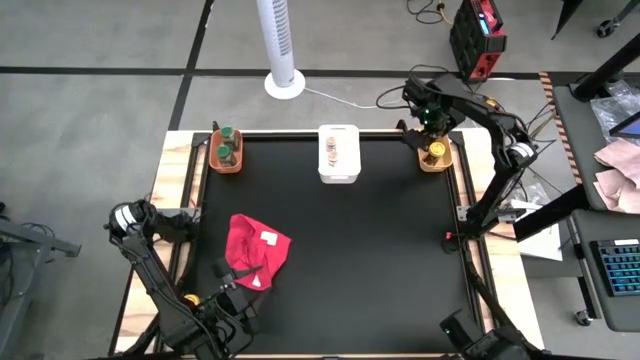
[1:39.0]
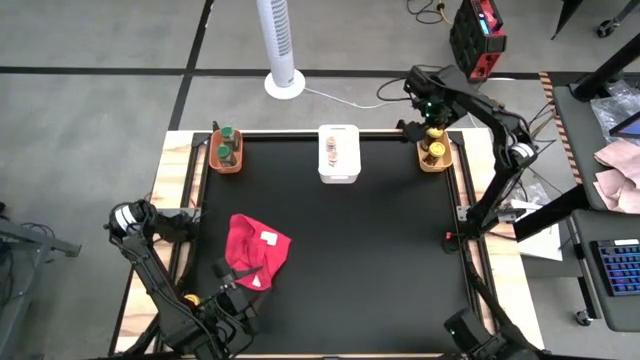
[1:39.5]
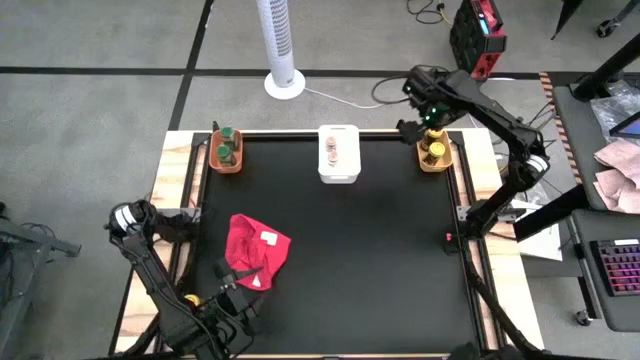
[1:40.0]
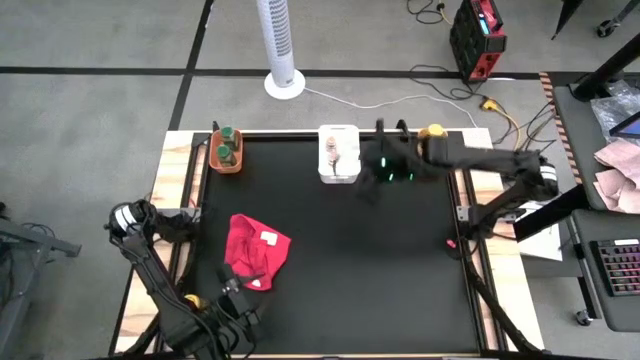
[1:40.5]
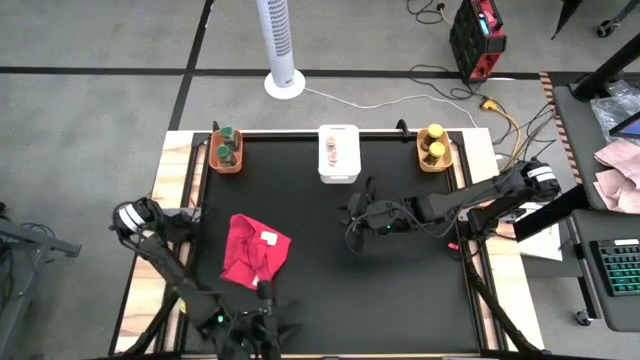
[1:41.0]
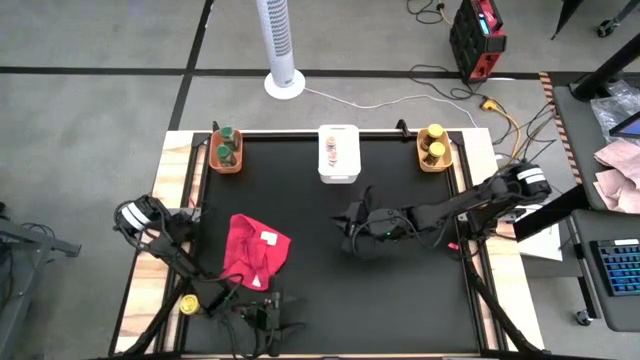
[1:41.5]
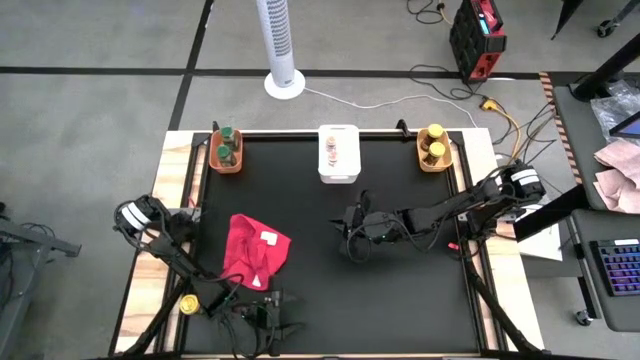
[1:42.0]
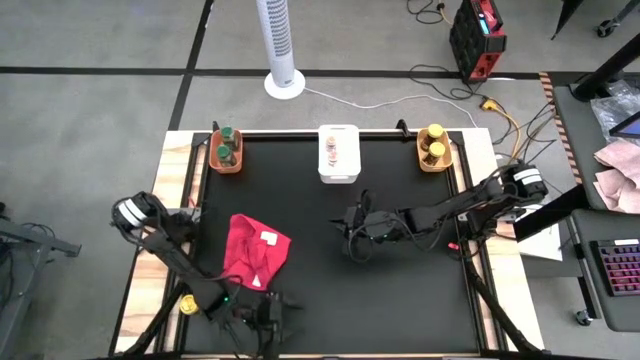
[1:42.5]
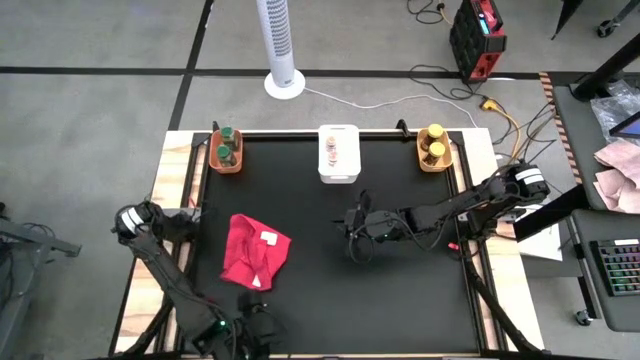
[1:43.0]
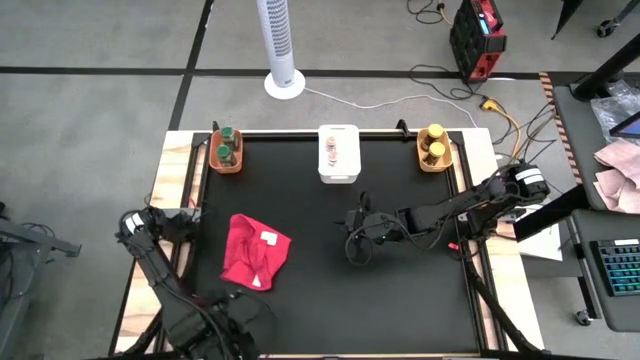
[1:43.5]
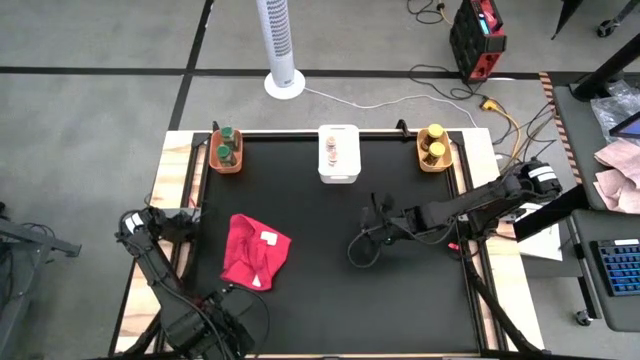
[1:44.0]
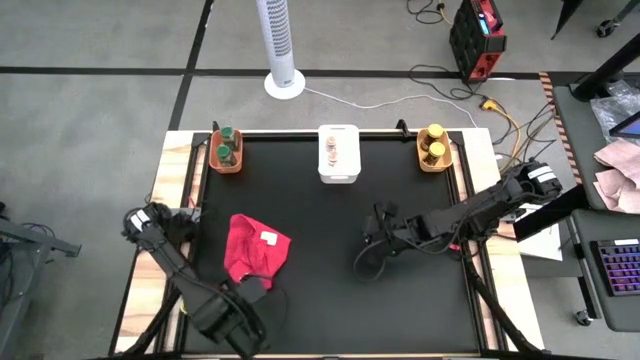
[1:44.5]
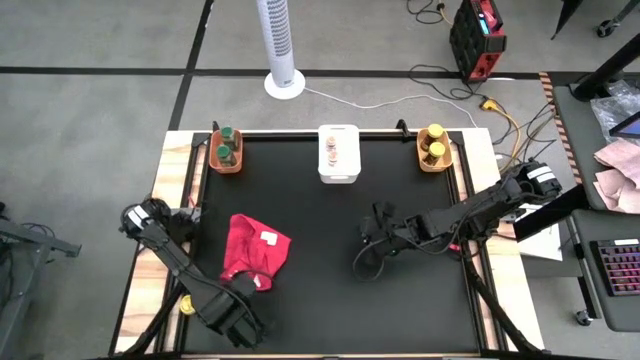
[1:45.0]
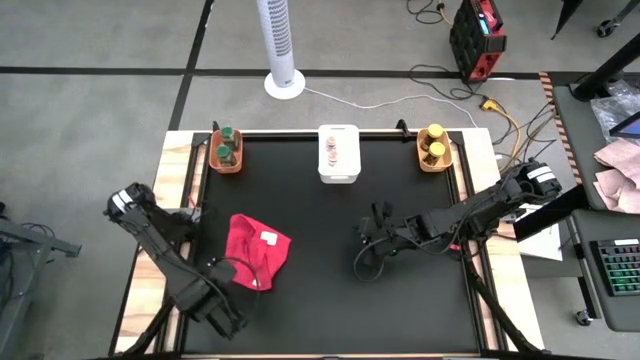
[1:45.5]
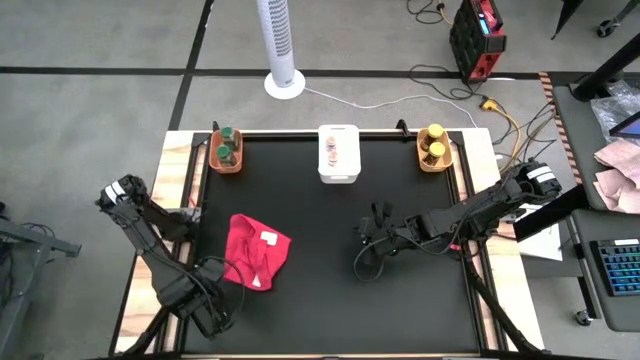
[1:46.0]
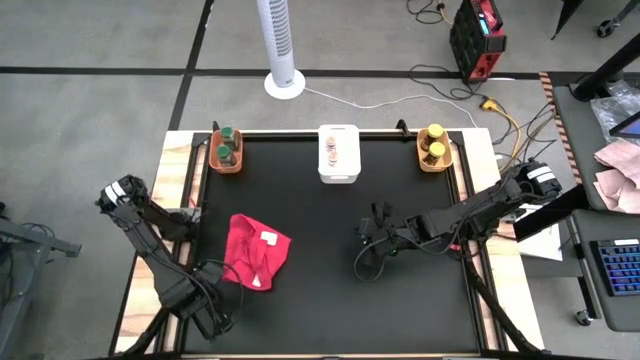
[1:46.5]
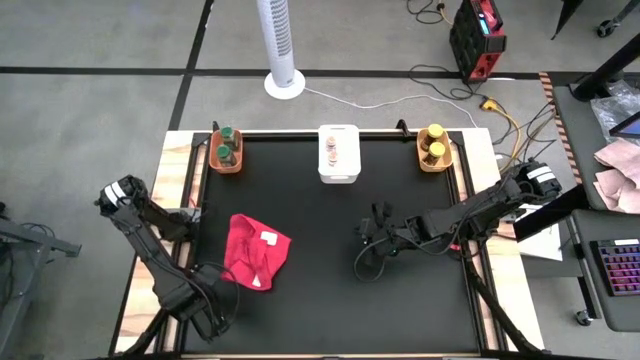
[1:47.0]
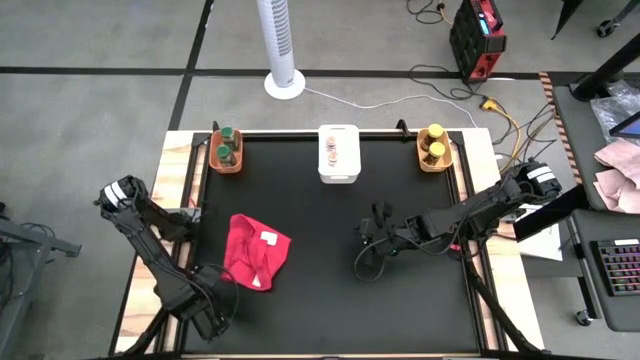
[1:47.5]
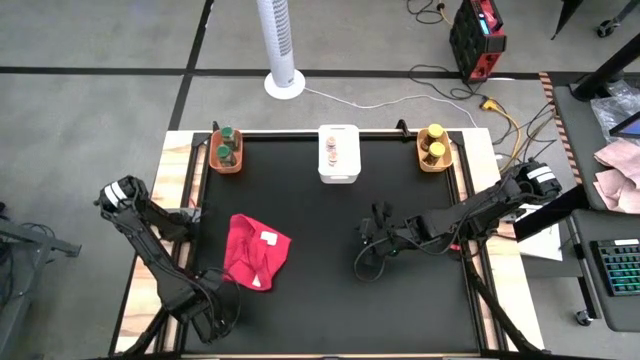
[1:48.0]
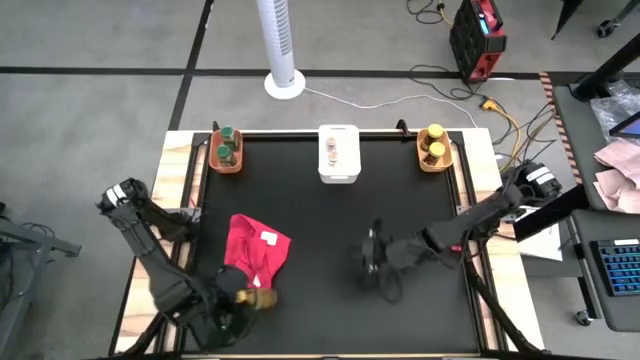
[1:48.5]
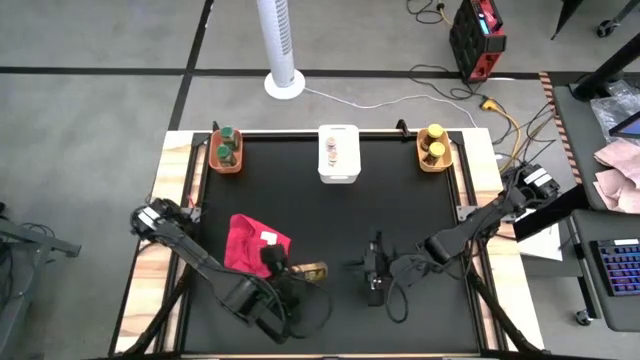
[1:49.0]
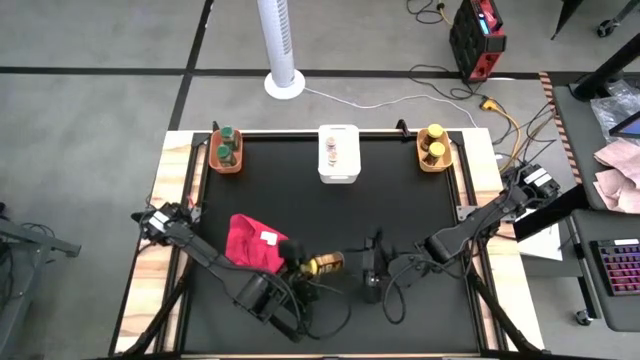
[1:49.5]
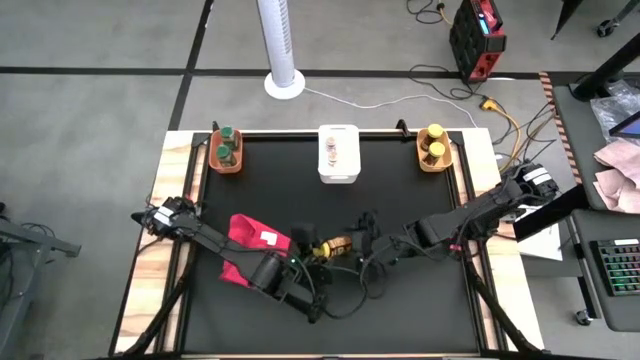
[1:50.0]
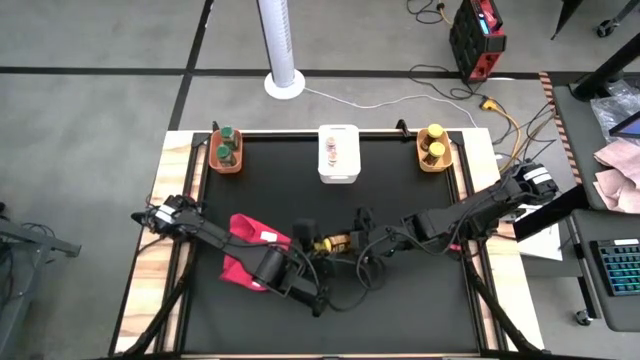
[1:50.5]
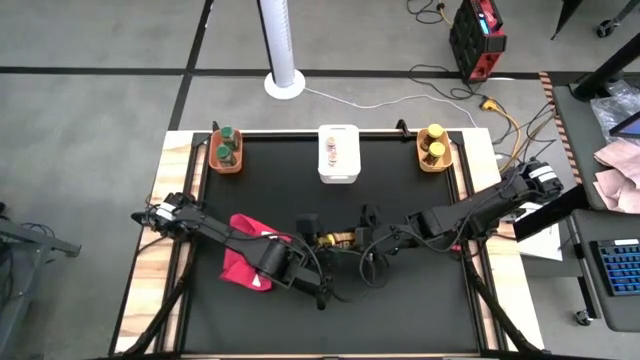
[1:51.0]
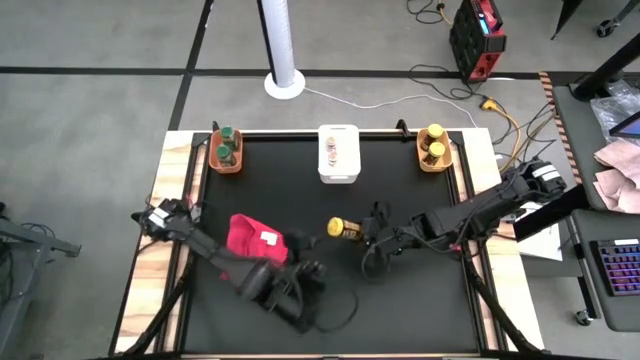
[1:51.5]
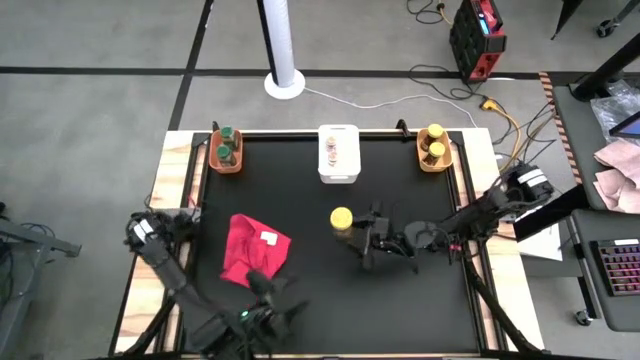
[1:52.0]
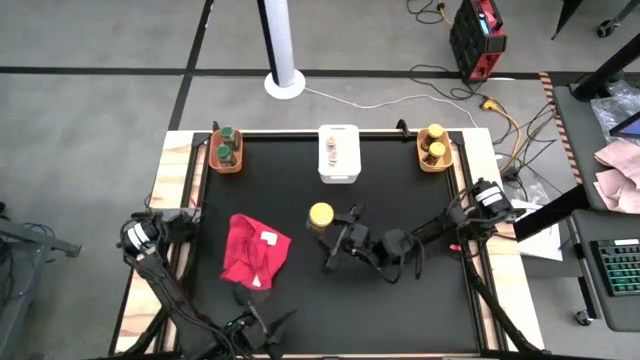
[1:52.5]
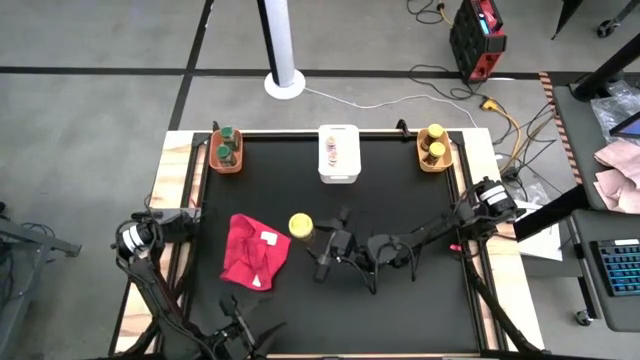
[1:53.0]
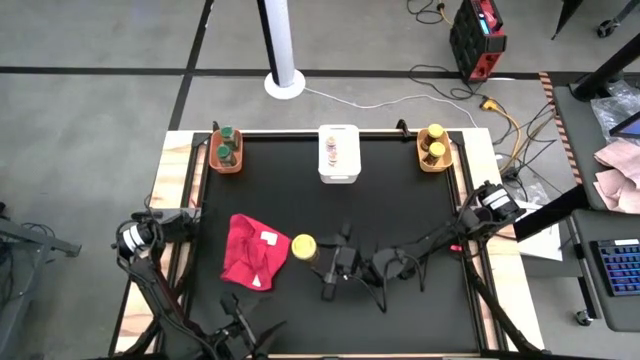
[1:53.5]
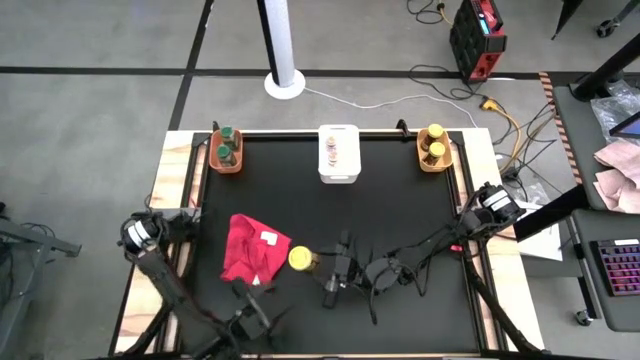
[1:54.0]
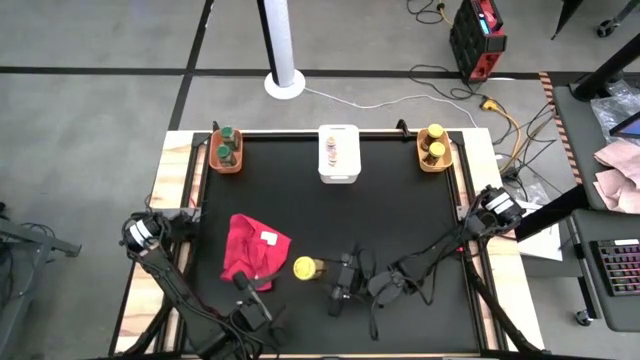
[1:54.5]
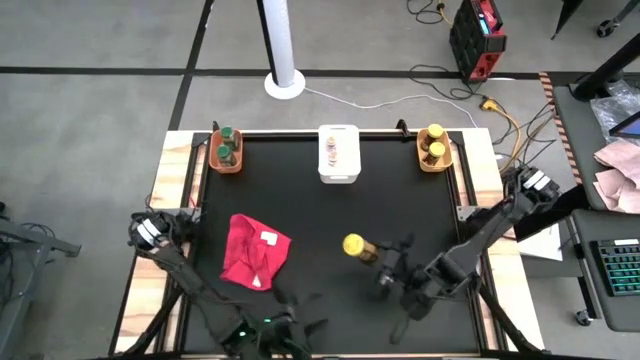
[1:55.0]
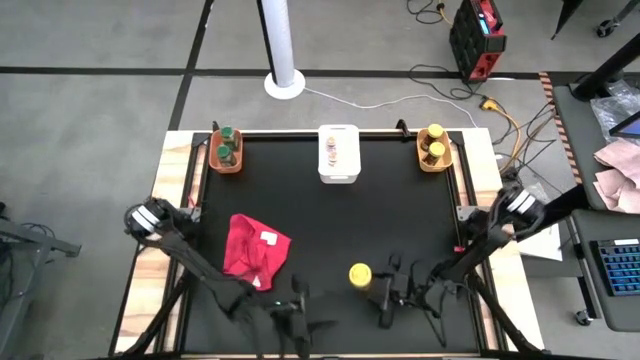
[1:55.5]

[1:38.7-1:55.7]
Task: Sort spices by type
Put the yellow seasoning bottle into the yellow bin

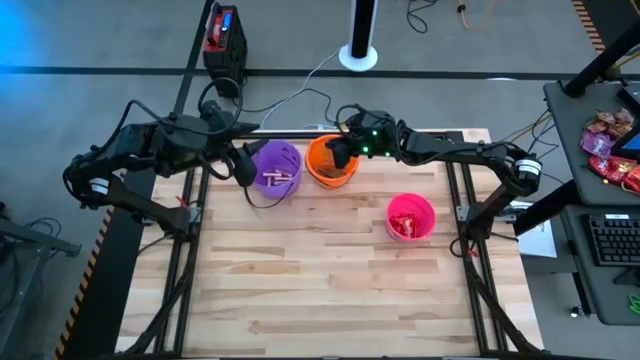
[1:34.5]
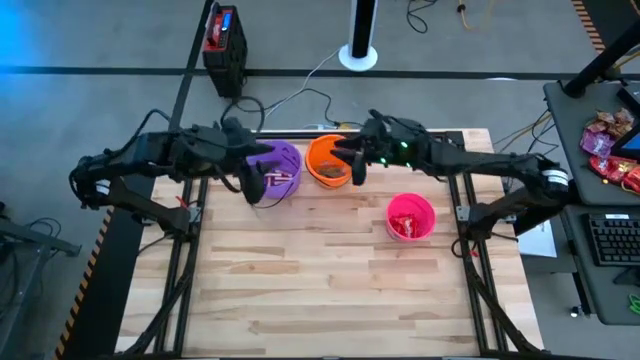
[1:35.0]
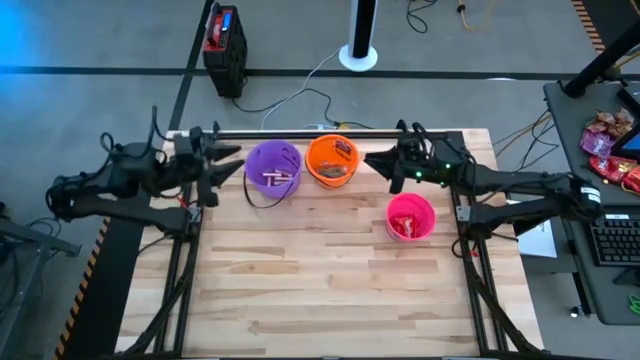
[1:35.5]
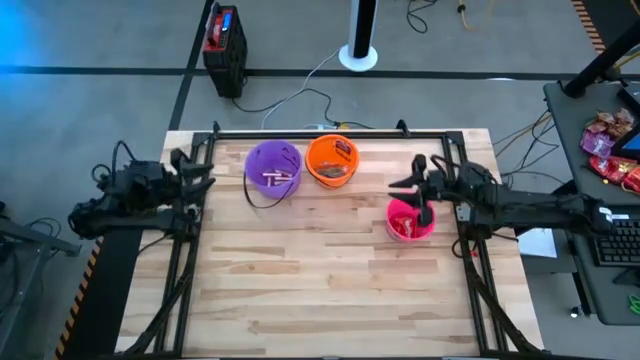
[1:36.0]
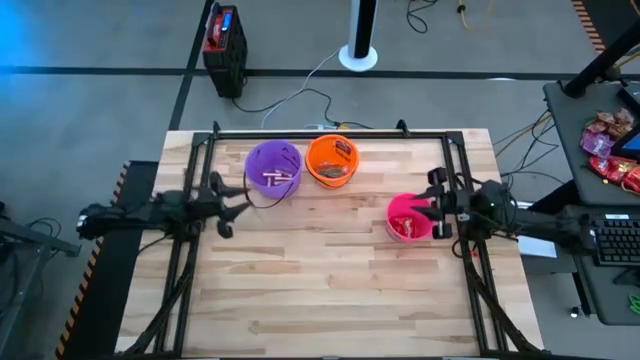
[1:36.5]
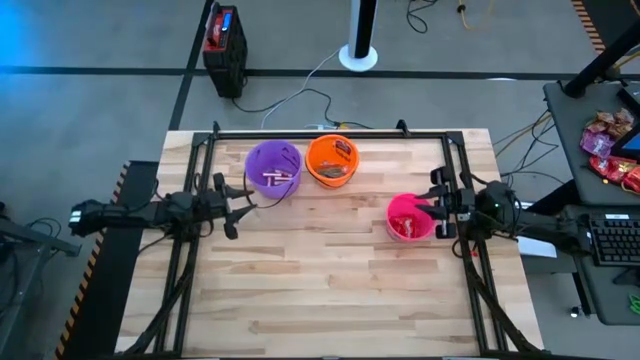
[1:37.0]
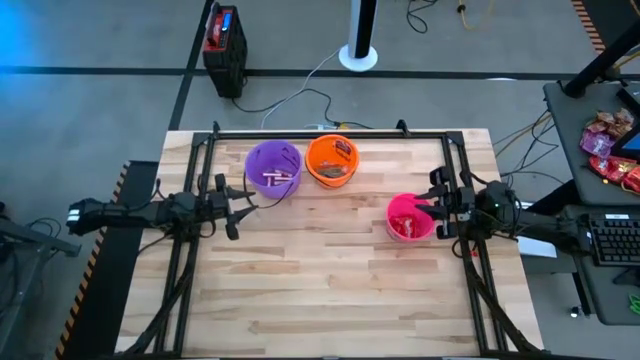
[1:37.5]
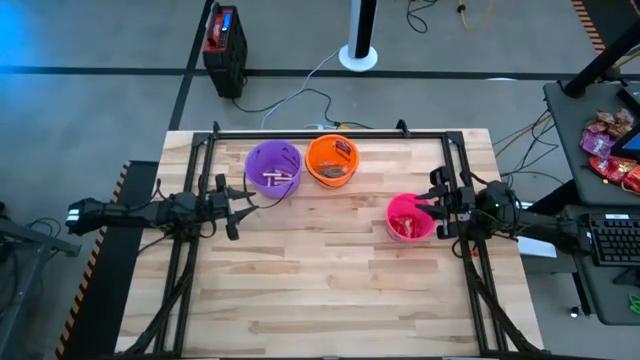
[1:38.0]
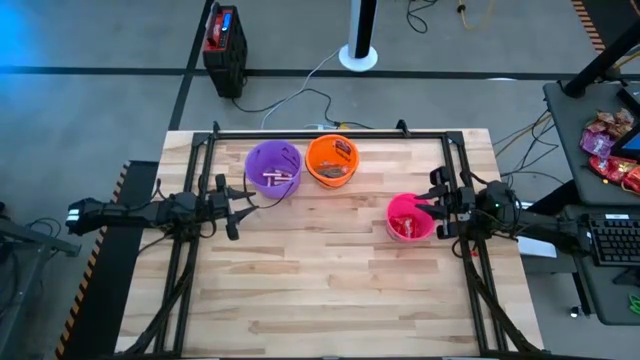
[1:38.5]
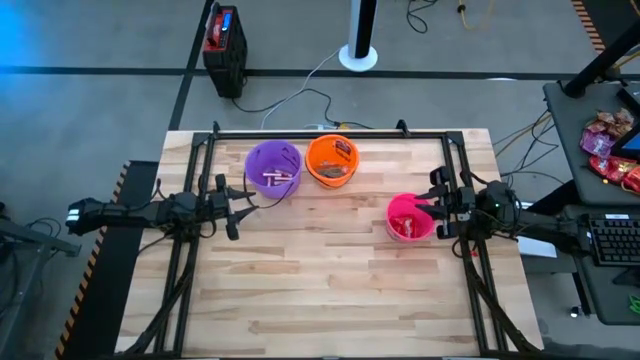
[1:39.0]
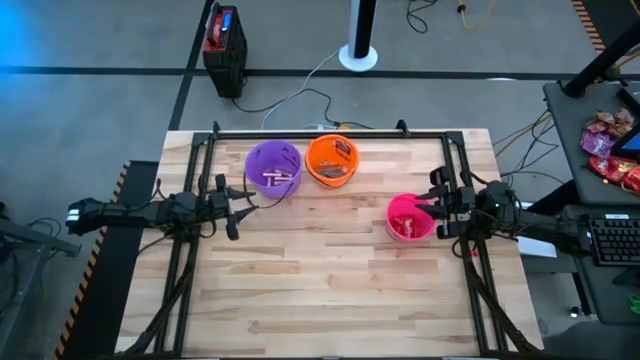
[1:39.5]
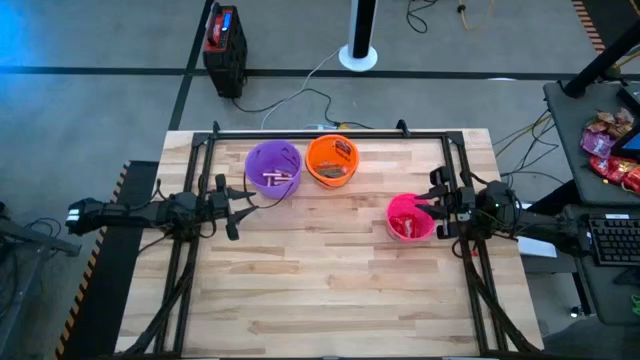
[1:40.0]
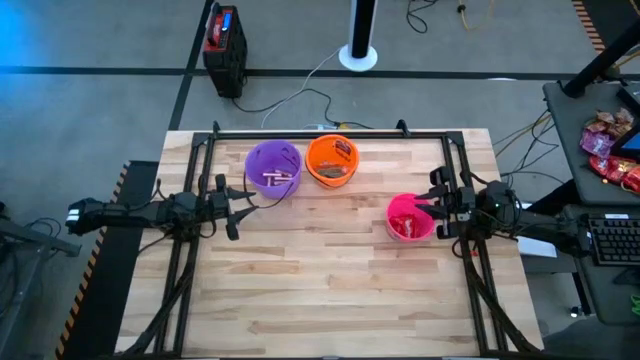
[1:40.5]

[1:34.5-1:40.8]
Task: Sort candy by brand, put in halloween buckets
Return to Home Position
